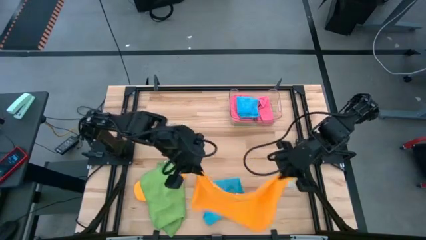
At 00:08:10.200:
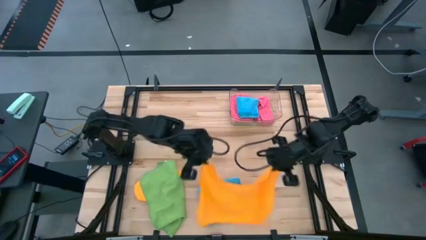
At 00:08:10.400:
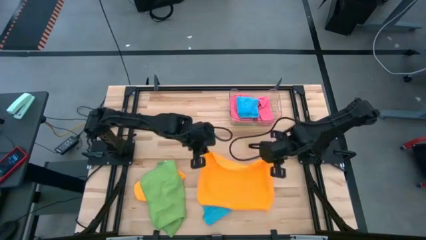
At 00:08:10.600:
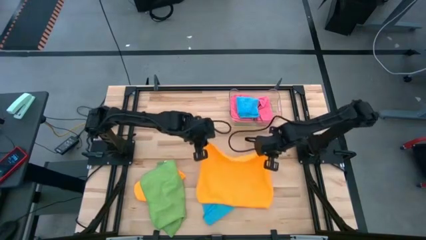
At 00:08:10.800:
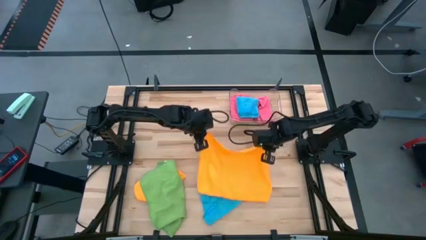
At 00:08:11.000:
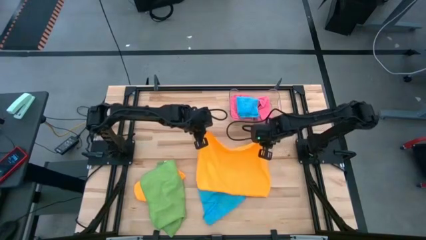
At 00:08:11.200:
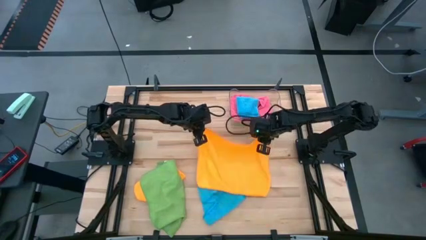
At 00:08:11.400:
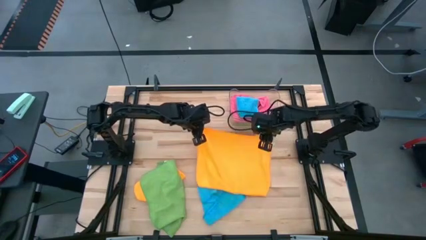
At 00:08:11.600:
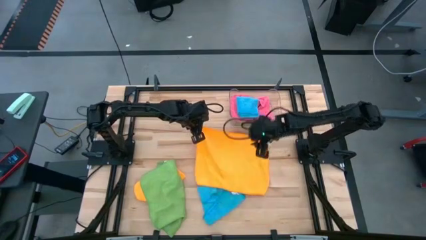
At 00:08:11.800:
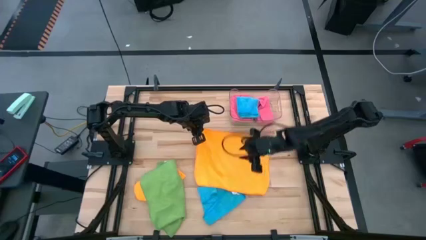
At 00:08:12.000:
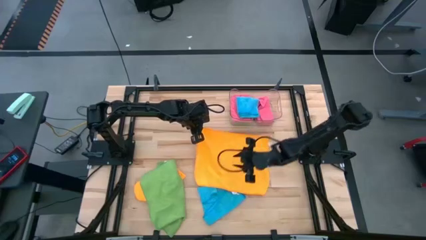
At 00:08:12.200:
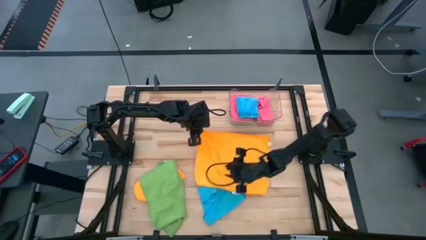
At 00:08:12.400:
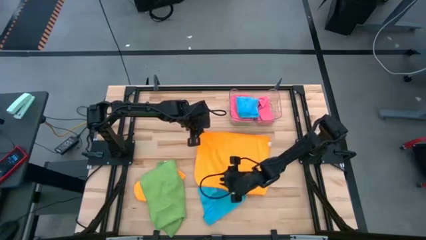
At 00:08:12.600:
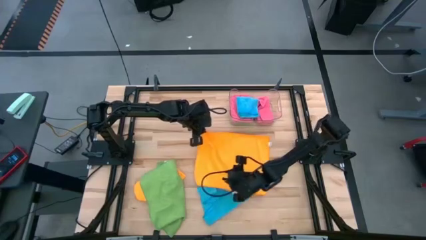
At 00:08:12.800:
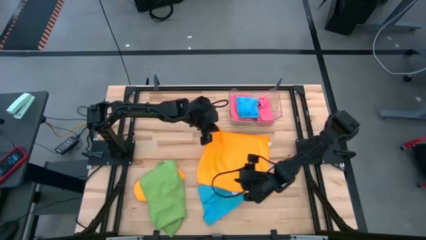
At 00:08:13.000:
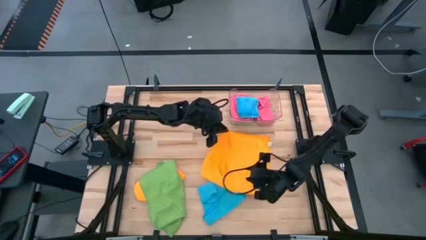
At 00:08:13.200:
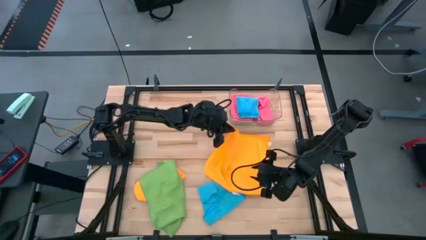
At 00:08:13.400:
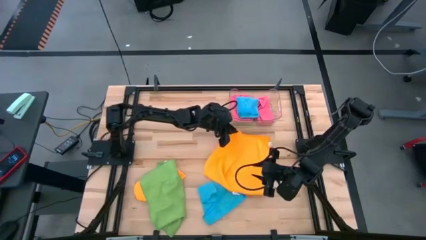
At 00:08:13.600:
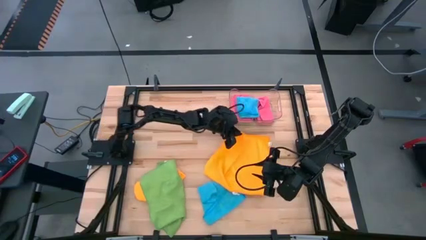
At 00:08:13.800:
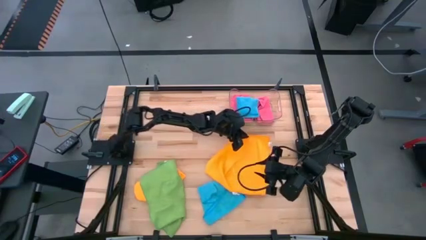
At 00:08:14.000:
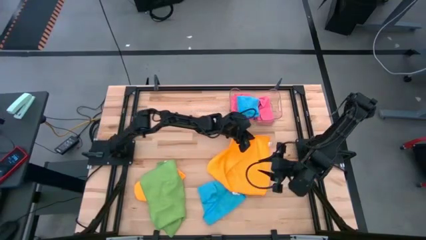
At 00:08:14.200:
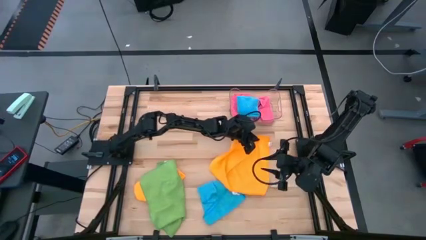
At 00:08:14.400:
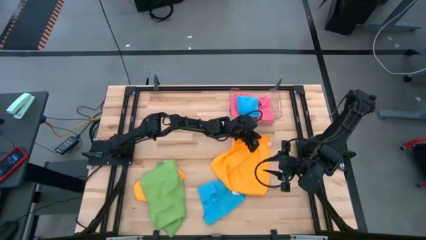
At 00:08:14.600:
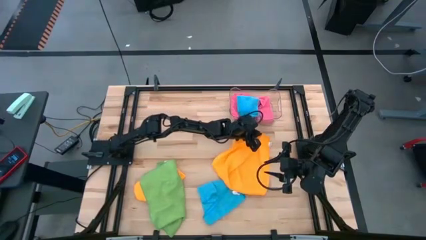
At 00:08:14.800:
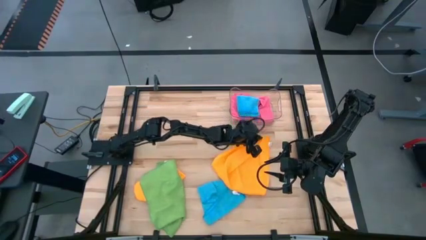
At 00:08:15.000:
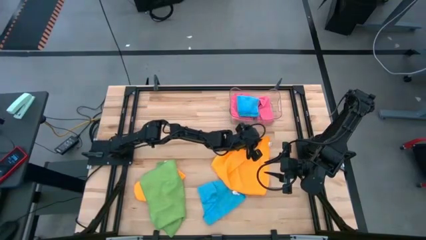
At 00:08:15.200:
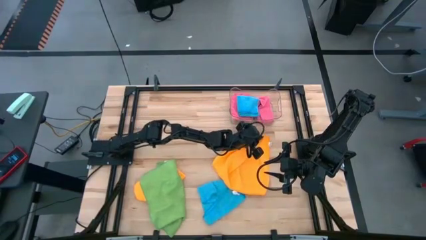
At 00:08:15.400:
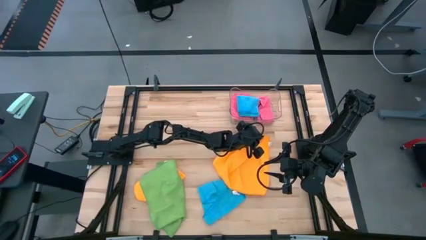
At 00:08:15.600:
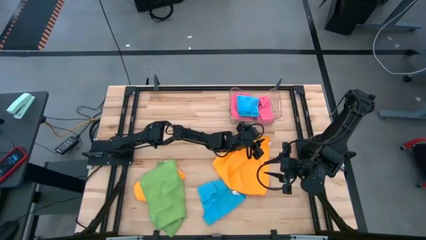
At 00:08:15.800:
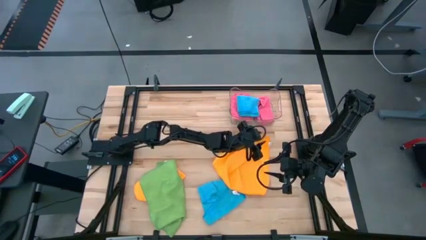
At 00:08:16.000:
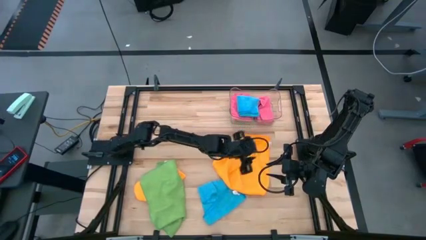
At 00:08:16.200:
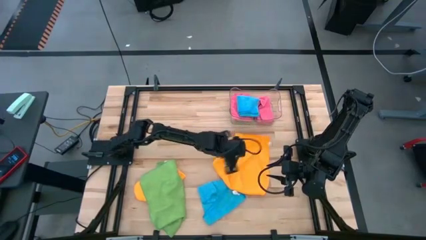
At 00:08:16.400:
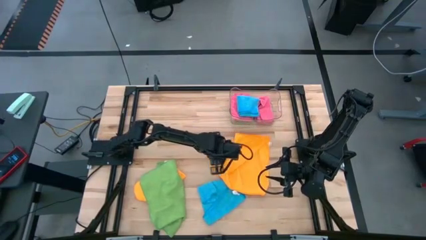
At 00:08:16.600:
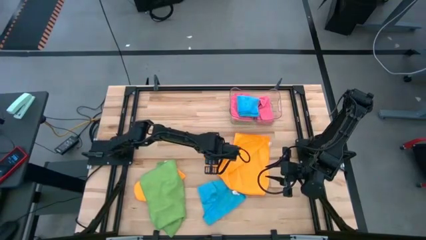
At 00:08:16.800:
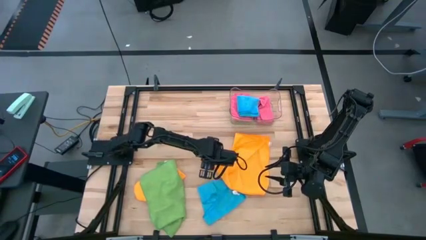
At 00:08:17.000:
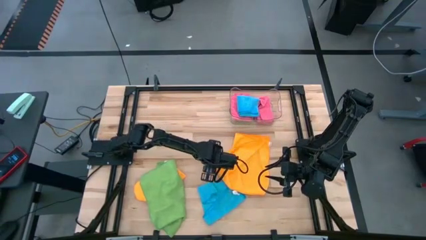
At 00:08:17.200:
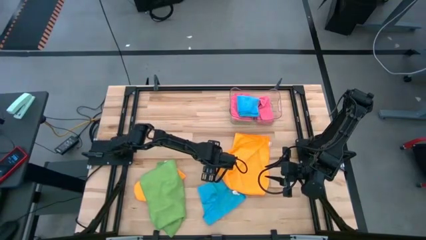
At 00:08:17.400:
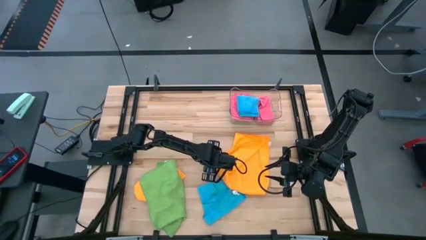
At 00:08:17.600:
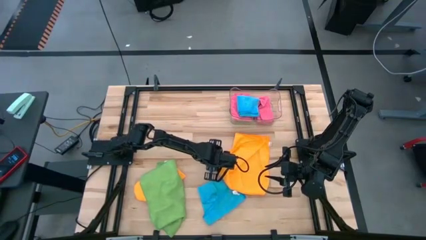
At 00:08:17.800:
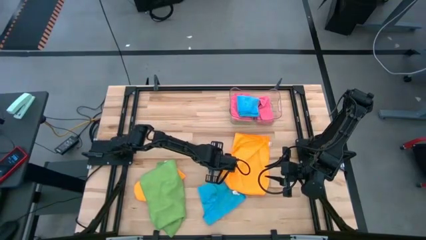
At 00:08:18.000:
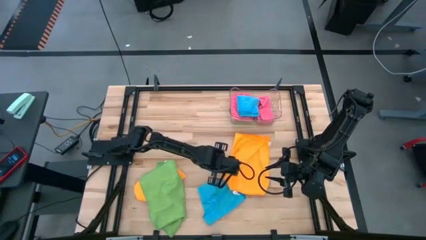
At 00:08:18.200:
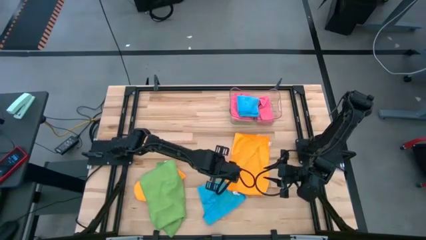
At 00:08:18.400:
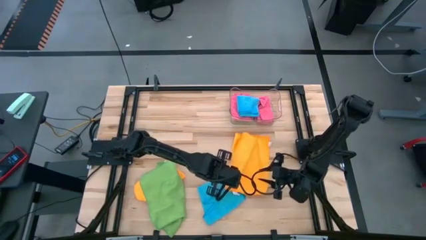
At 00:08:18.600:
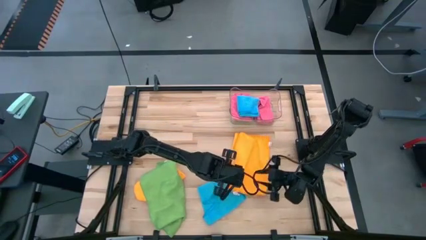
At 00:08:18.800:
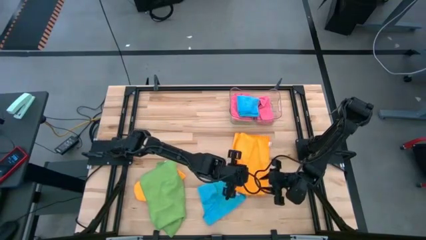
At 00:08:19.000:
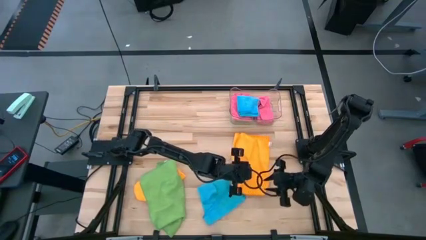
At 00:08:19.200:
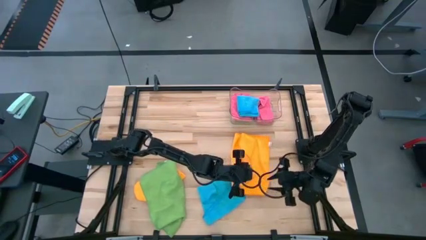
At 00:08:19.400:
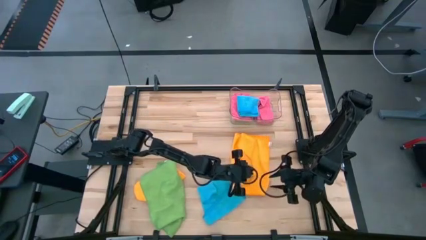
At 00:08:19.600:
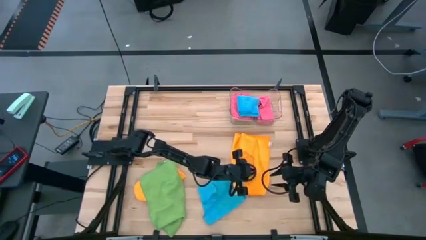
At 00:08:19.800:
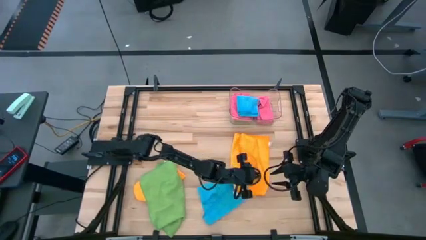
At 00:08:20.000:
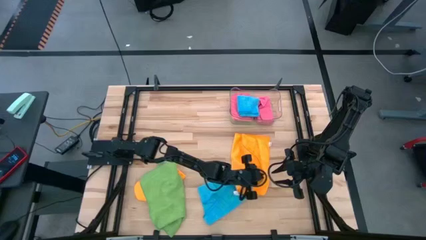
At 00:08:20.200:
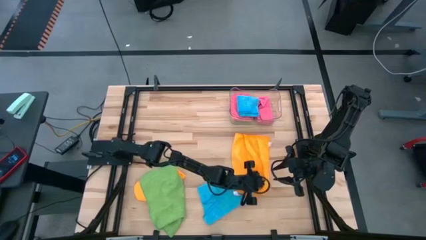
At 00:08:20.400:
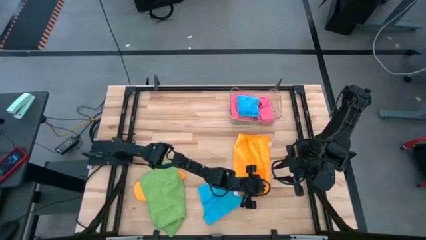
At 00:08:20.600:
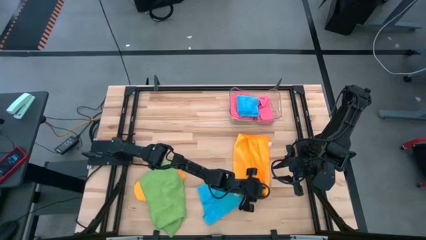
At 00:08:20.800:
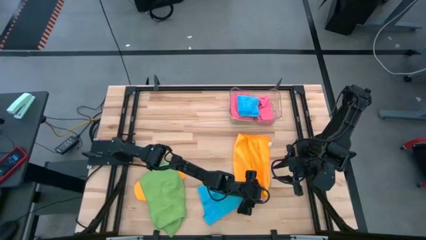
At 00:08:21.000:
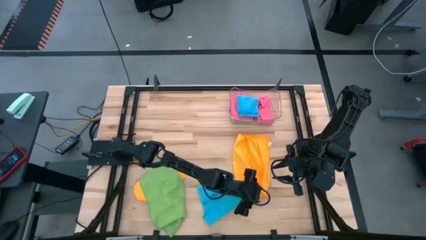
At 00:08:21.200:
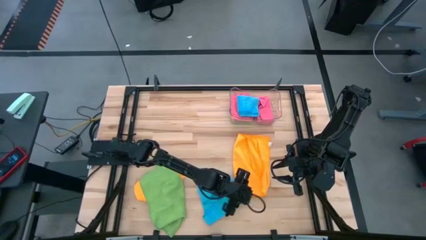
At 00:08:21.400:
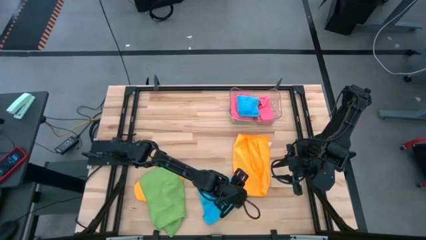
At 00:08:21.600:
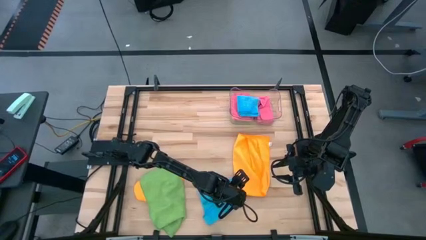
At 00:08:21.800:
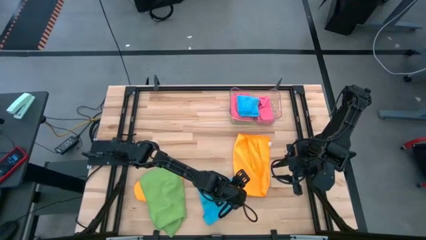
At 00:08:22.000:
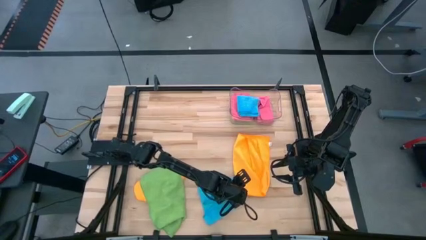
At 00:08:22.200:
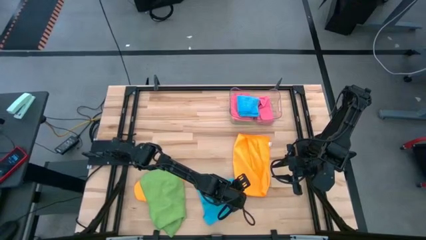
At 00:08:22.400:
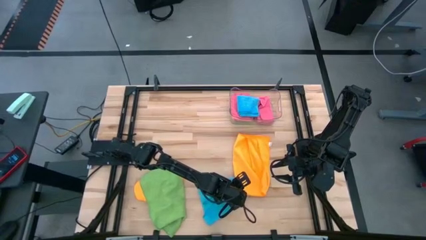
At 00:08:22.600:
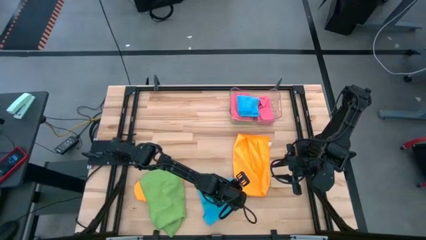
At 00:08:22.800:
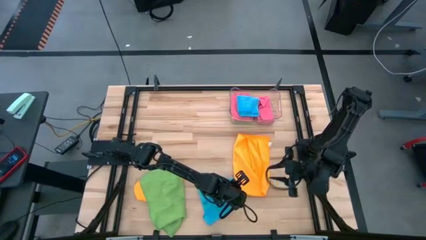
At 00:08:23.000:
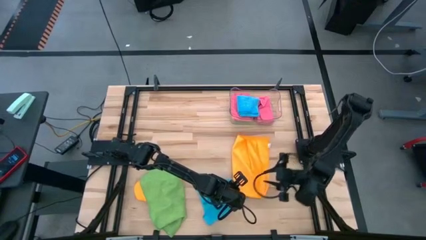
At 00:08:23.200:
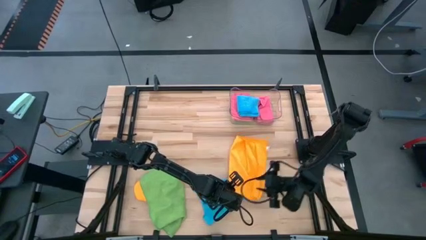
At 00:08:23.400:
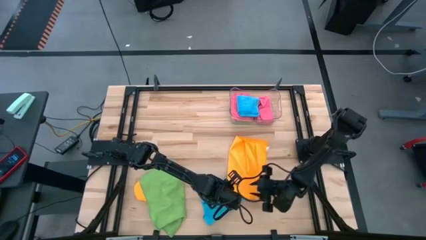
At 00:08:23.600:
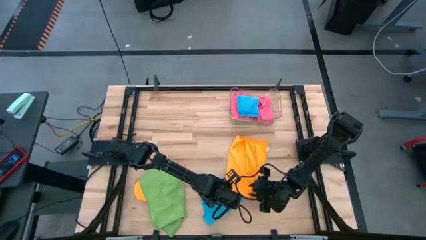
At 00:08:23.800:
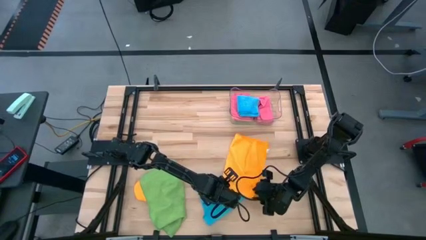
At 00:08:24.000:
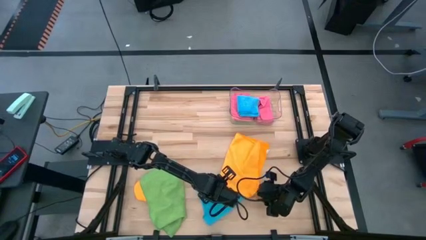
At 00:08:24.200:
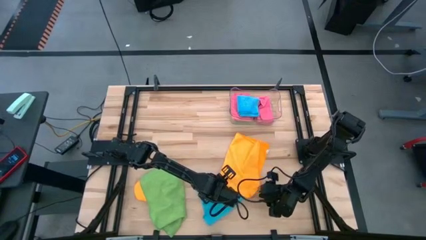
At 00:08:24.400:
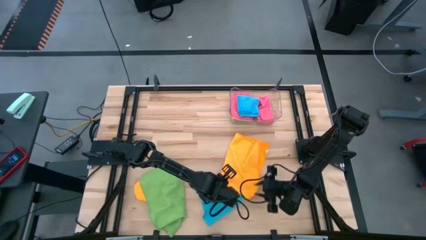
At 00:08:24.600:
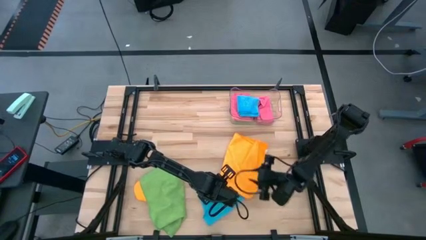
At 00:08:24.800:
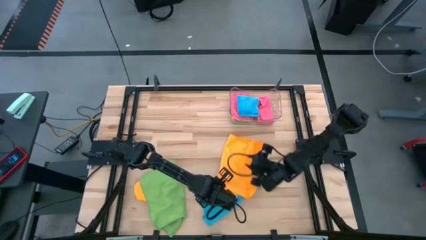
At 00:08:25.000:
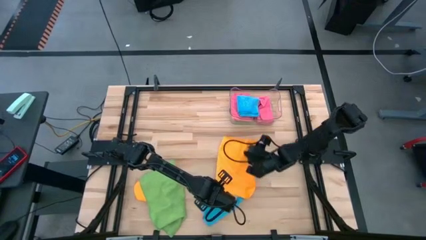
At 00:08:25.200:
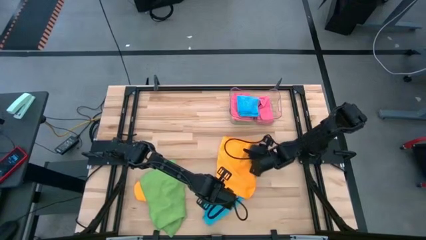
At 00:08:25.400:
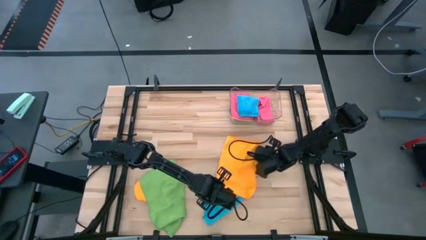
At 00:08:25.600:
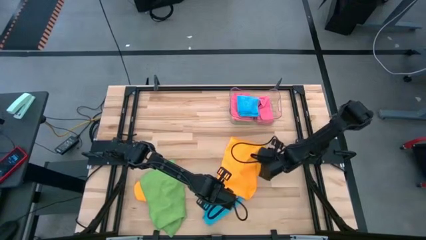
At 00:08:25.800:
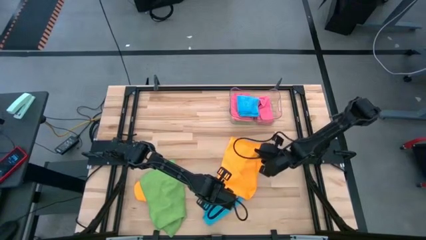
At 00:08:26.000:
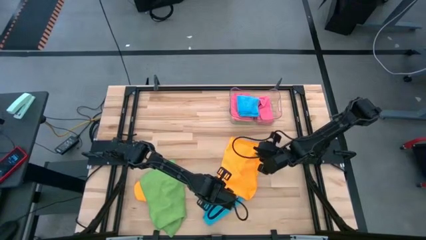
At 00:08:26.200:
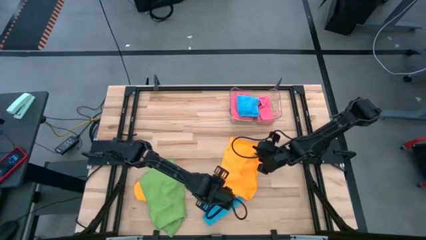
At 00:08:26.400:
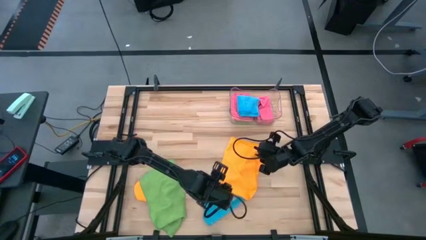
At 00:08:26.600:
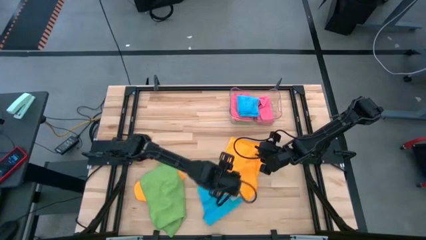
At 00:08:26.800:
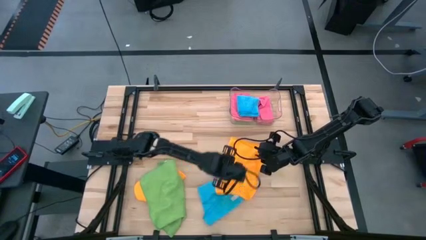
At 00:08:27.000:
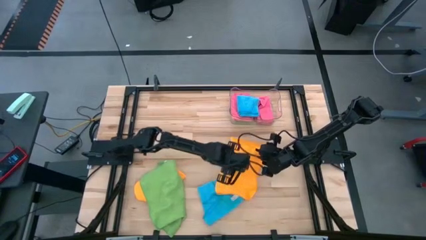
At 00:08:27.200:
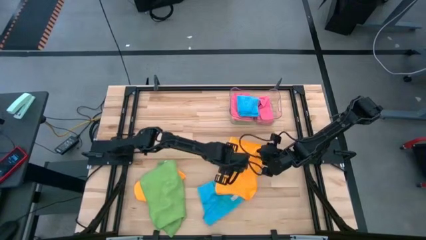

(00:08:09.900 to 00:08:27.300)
Task: Fold microfiber towels
Fold the right yellow towel
